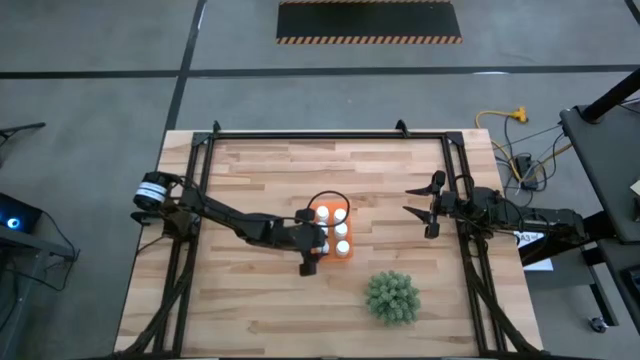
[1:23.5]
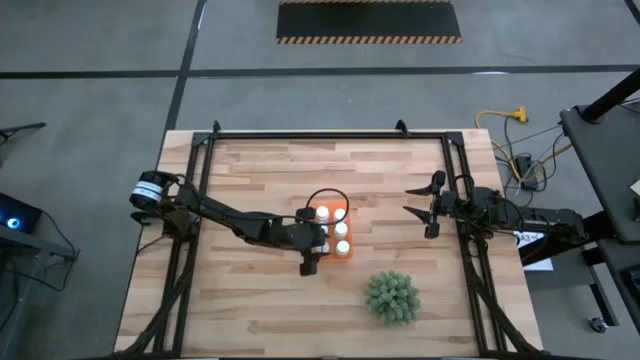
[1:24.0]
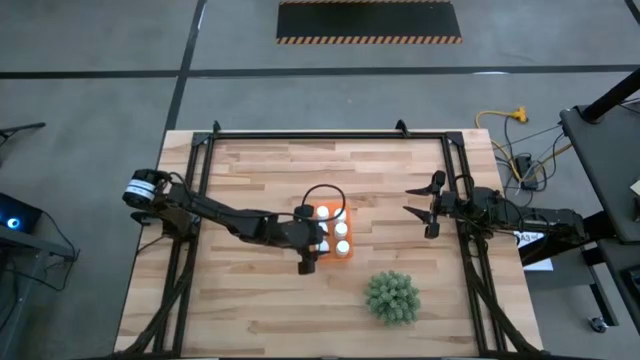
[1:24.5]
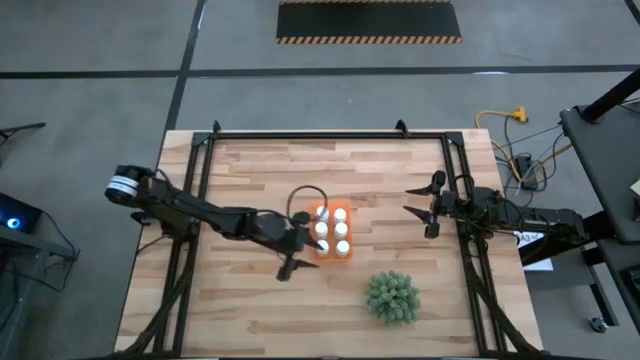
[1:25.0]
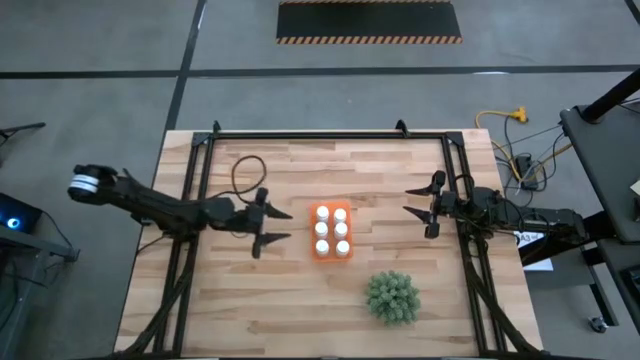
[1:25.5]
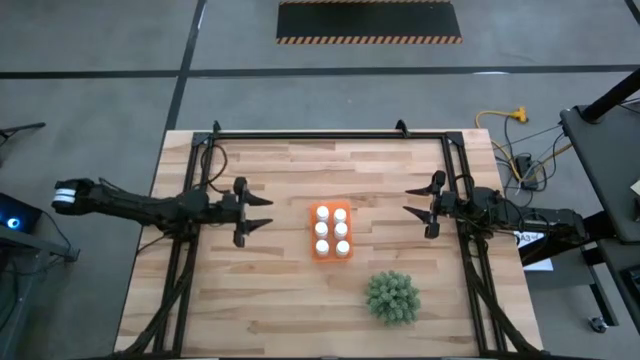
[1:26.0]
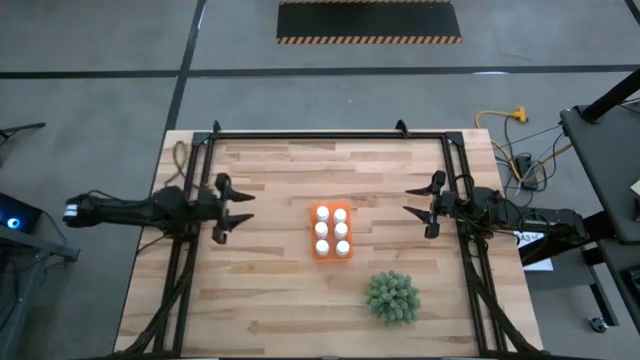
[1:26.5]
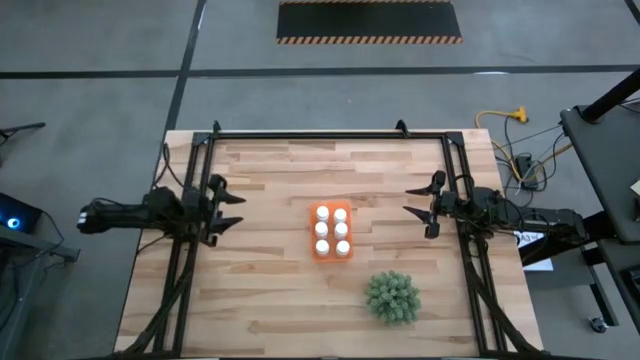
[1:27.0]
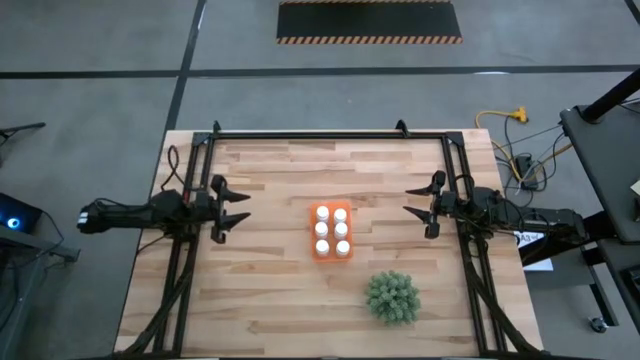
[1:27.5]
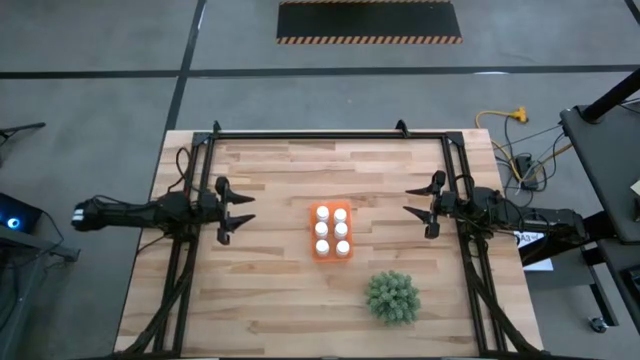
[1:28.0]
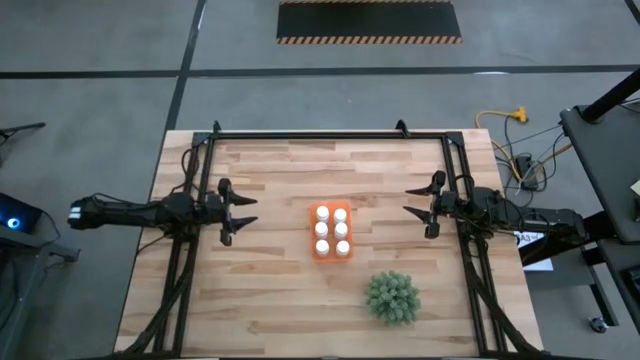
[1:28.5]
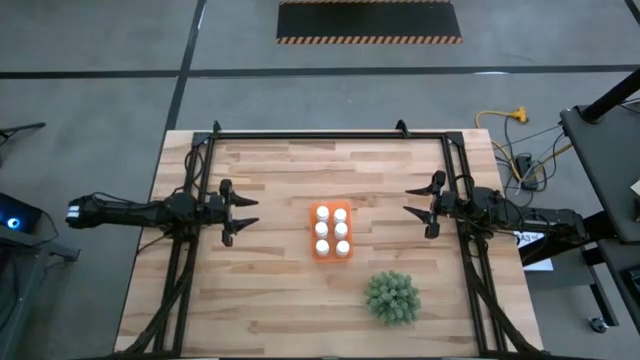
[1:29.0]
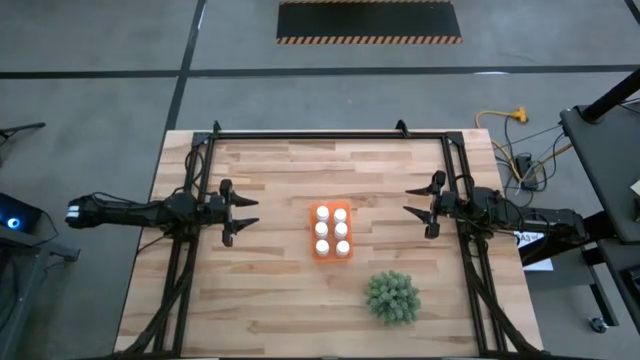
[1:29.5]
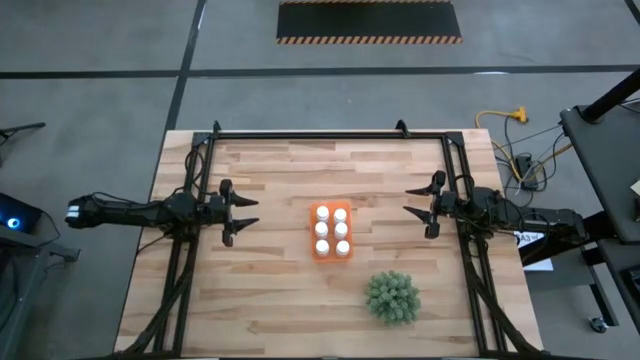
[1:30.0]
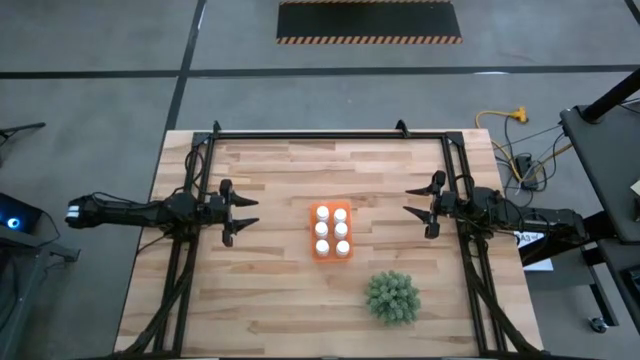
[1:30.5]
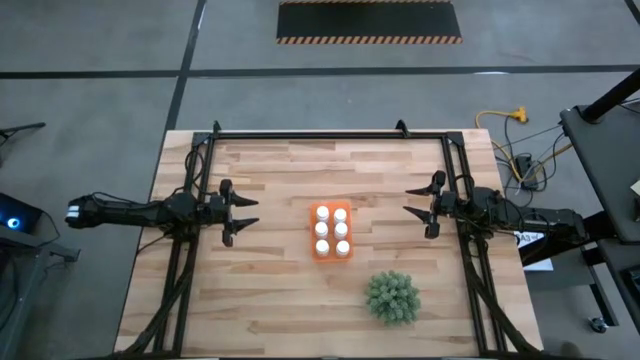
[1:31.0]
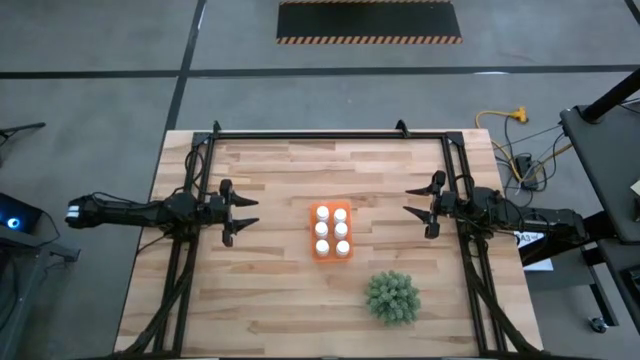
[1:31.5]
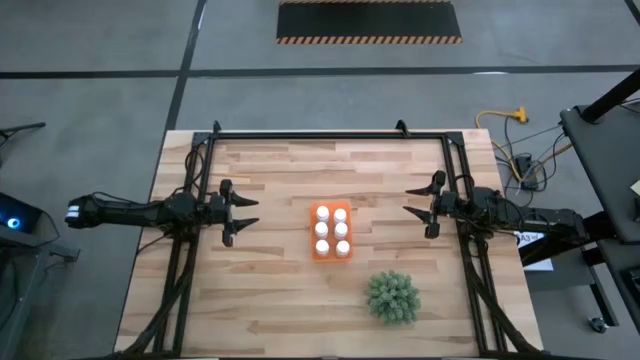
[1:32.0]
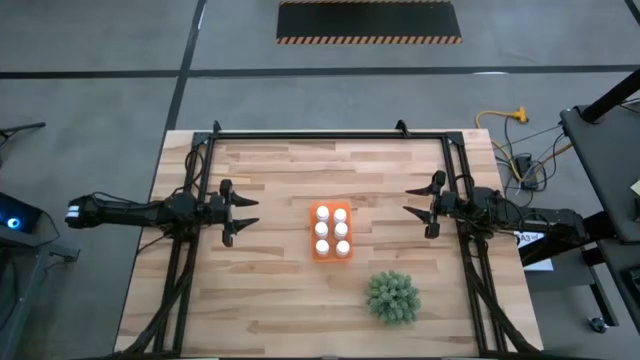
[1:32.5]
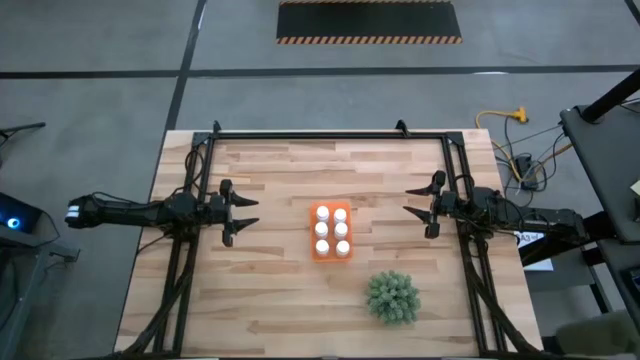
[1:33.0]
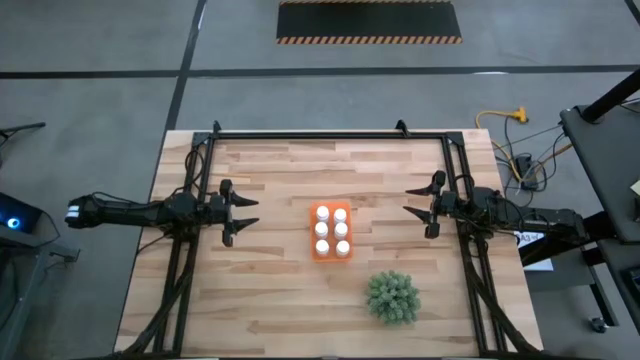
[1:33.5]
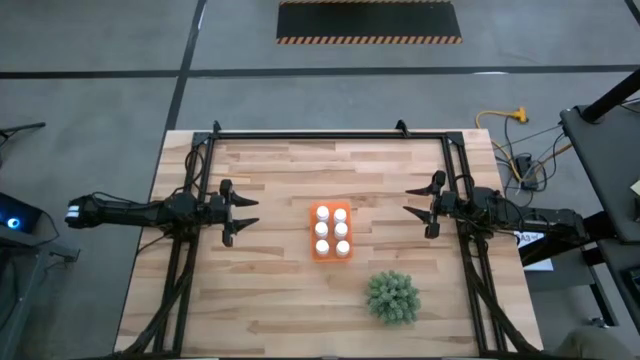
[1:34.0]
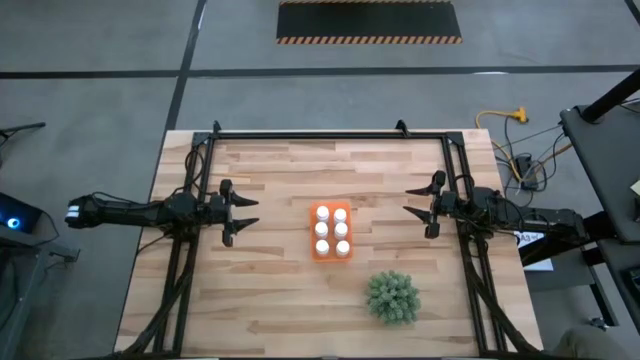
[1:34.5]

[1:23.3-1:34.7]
Task: Pick and place pill bottles into a basket
Return to Home Position

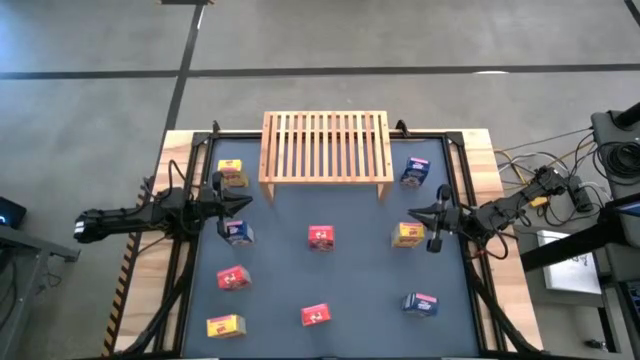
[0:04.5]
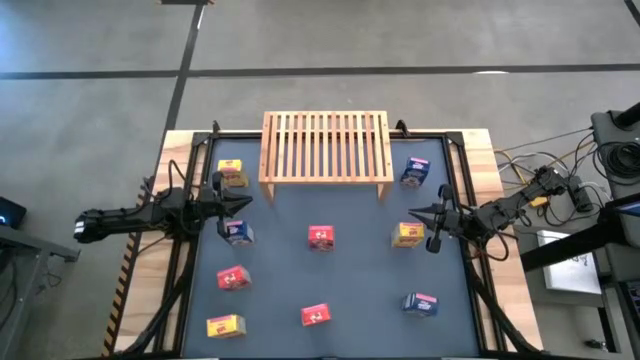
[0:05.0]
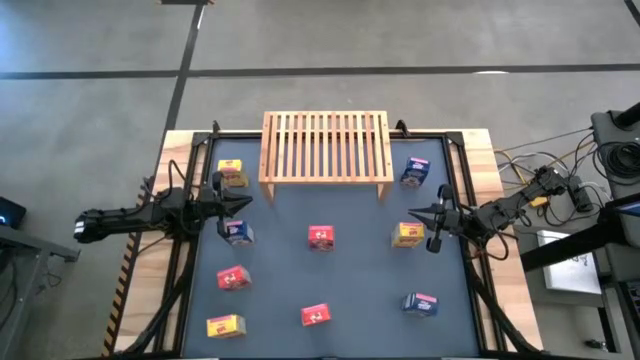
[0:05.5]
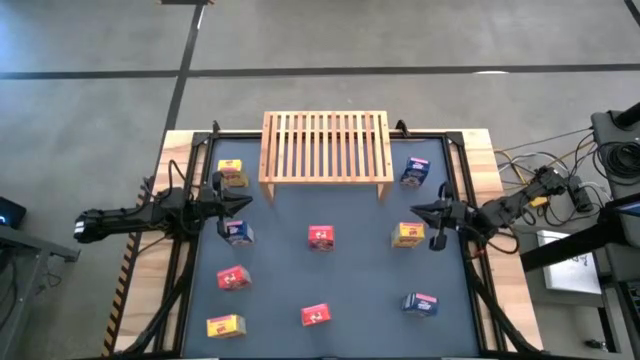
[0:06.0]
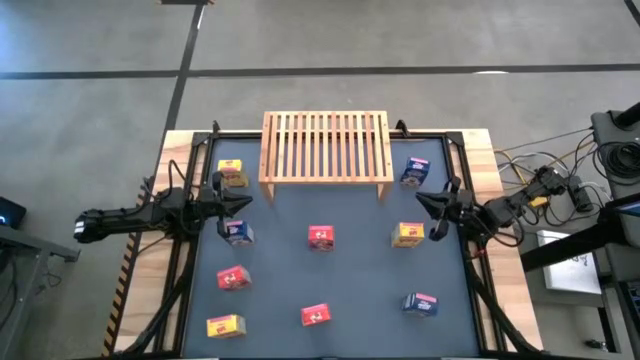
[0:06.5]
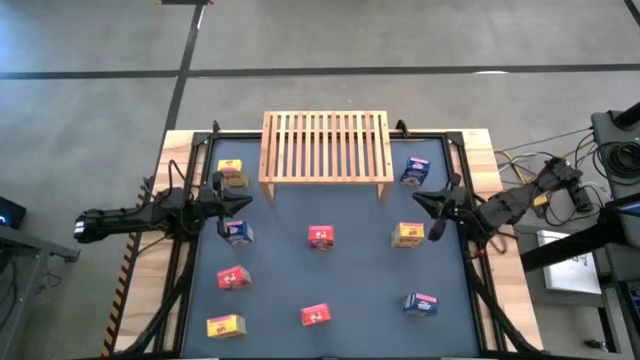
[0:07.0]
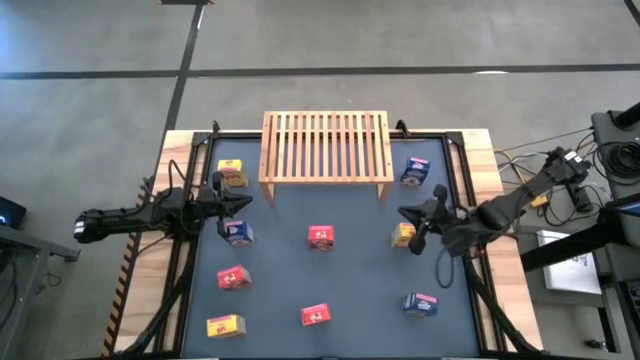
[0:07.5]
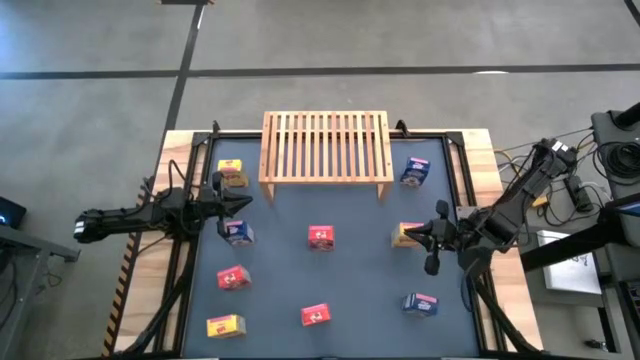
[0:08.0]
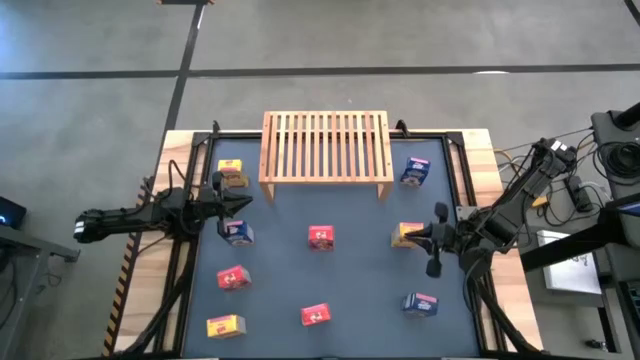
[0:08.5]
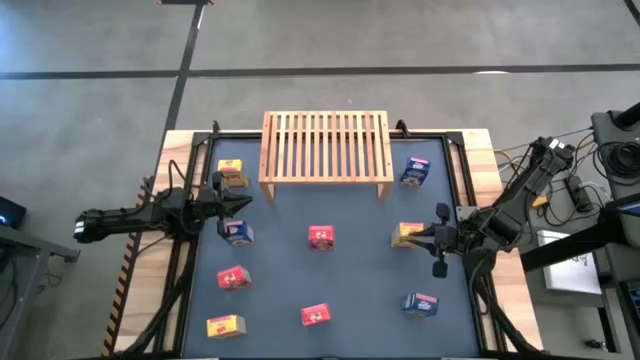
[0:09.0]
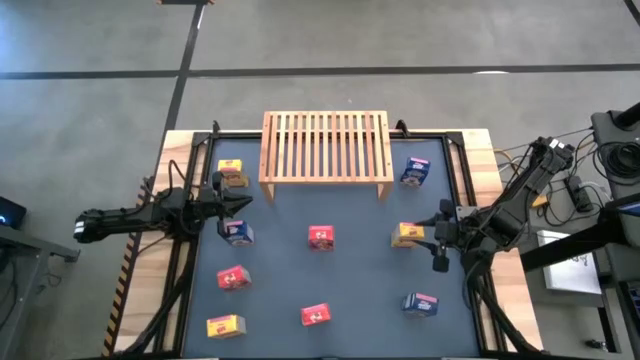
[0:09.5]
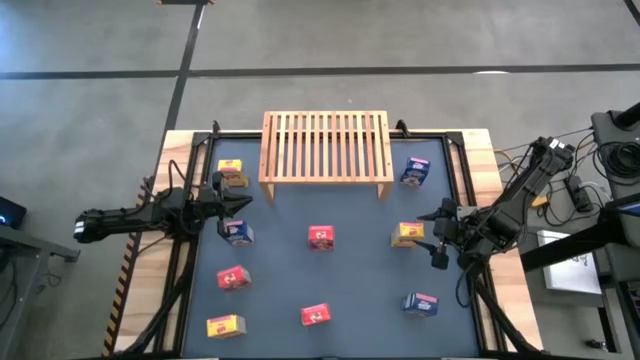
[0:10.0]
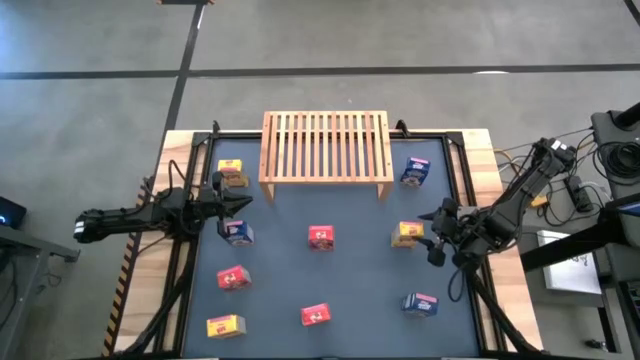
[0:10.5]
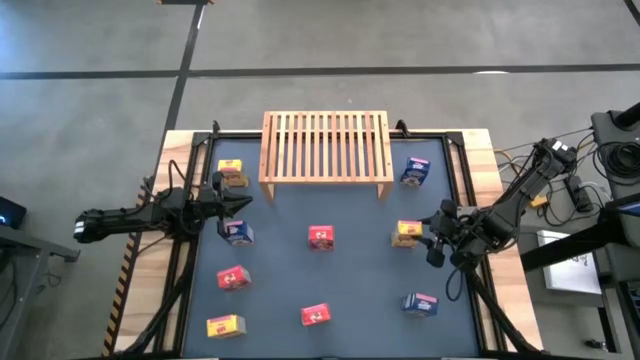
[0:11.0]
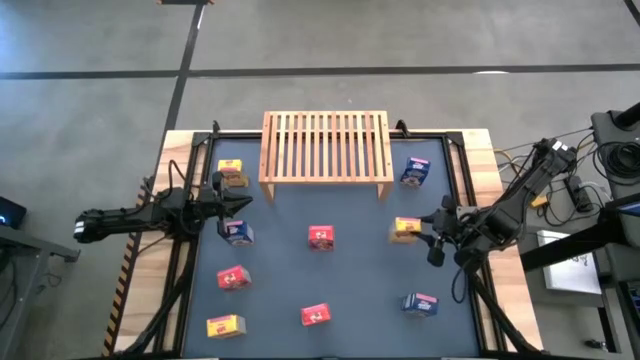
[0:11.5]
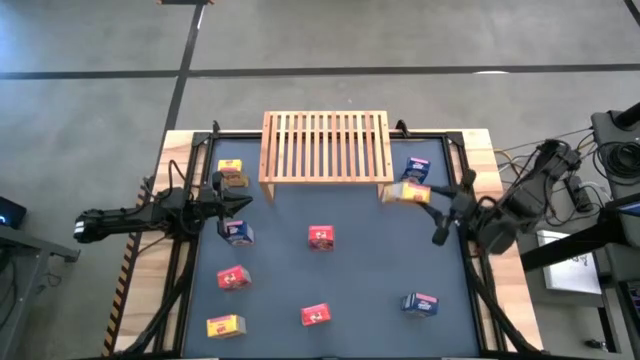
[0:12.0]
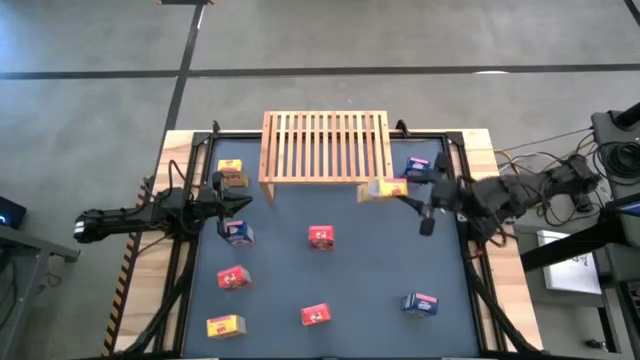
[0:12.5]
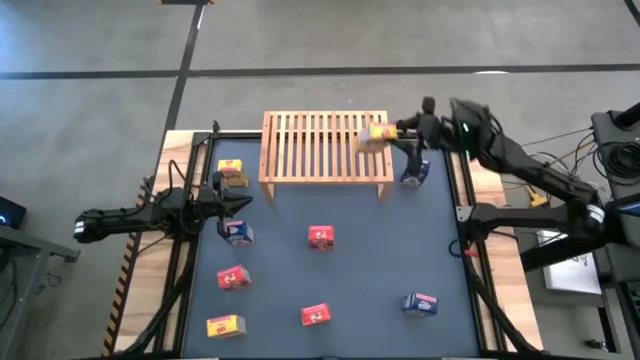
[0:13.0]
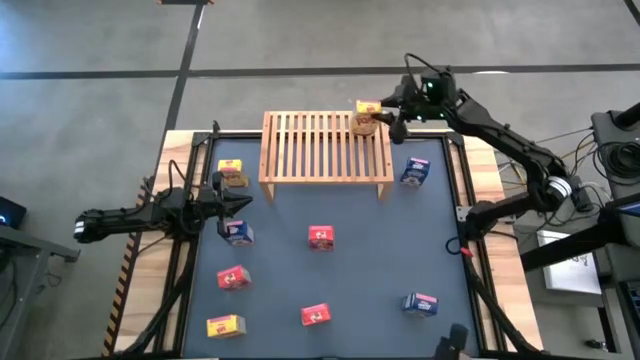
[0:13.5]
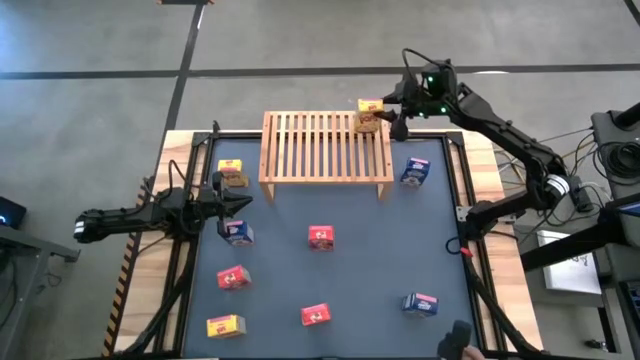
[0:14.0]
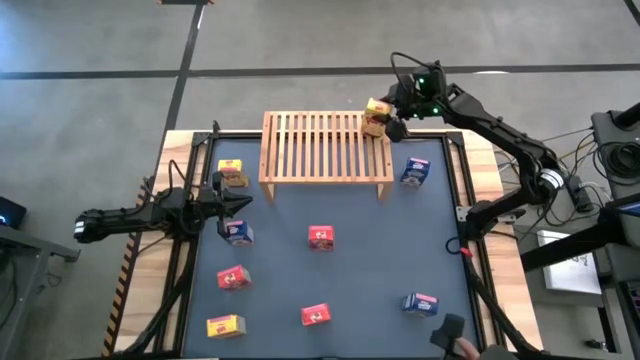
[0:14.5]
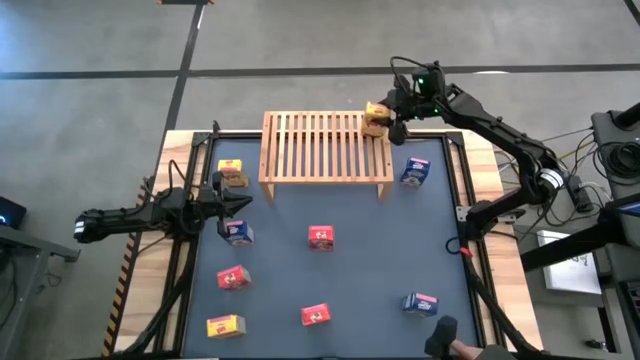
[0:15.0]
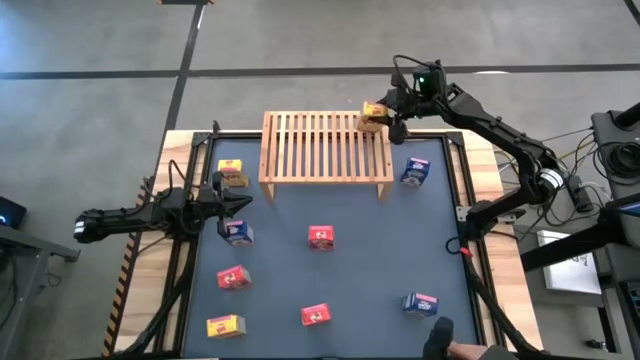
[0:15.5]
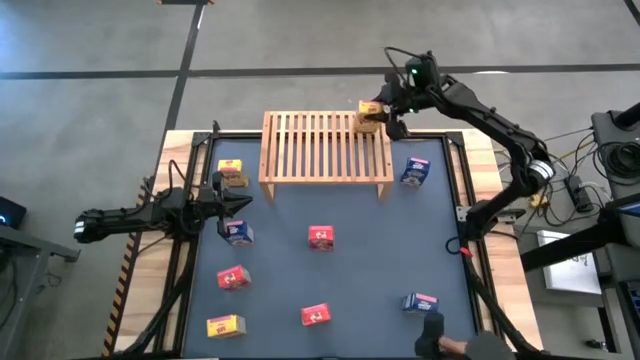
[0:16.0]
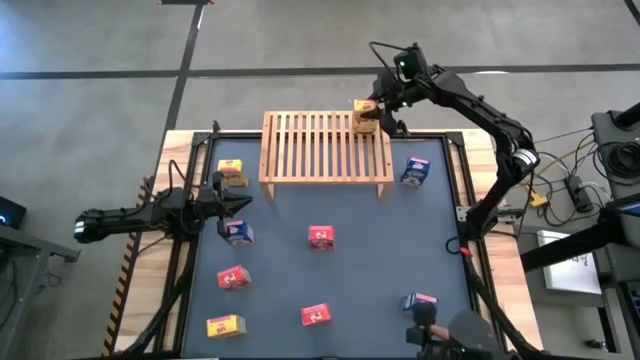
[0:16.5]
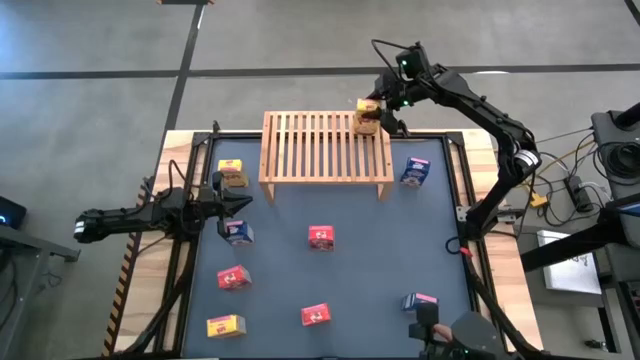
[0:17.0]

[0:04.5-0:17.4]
Task: Stack cereal on shelf
Put the right yellow cereal box on the shelf
